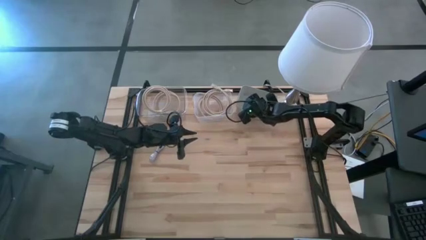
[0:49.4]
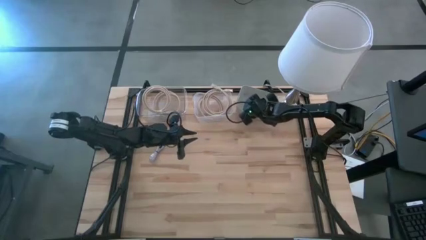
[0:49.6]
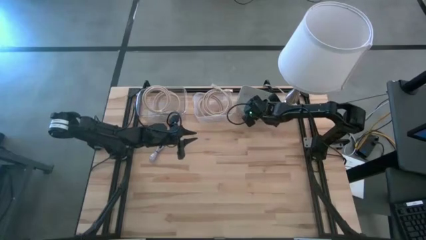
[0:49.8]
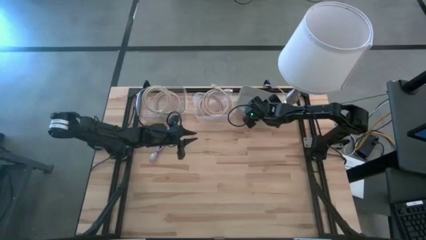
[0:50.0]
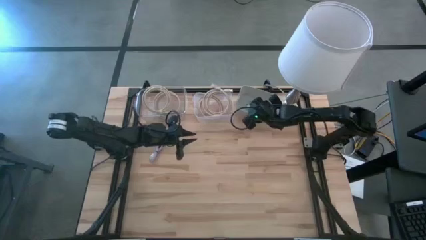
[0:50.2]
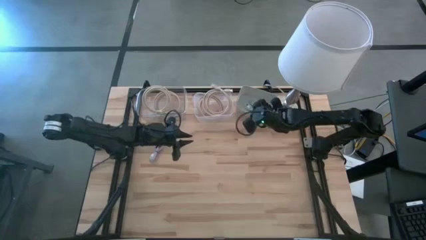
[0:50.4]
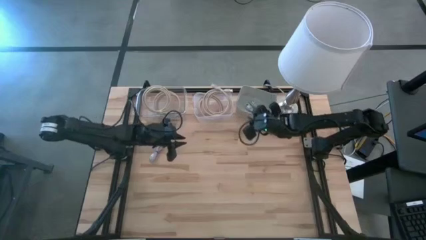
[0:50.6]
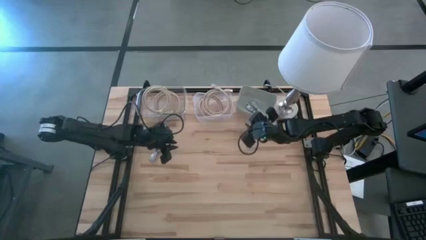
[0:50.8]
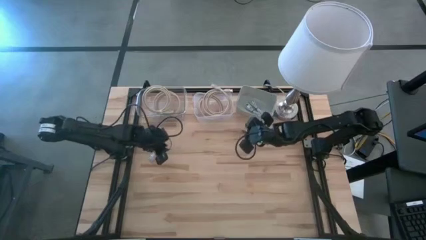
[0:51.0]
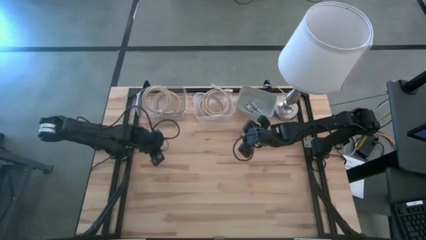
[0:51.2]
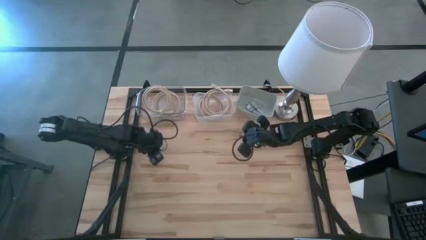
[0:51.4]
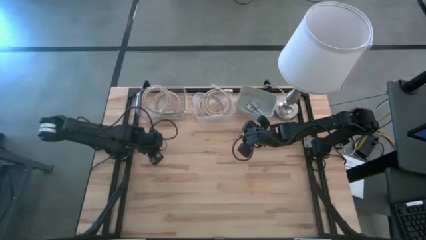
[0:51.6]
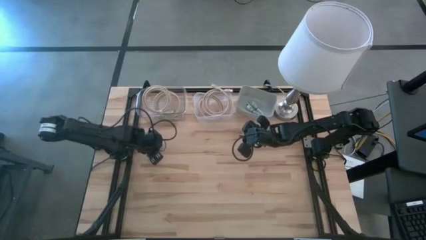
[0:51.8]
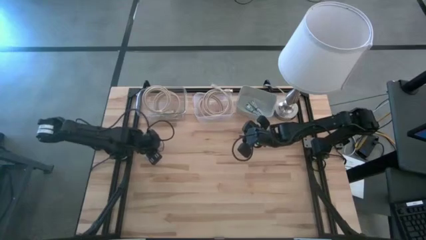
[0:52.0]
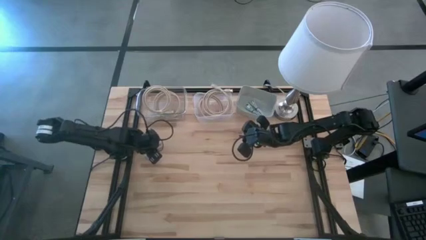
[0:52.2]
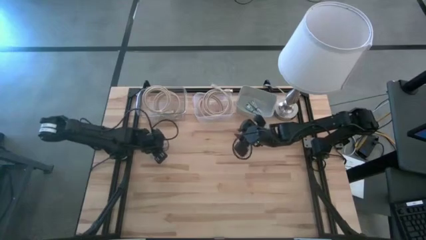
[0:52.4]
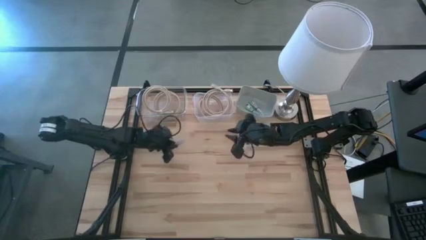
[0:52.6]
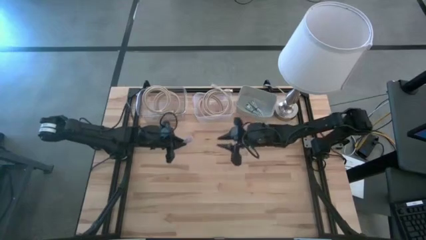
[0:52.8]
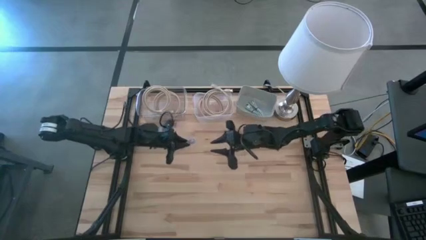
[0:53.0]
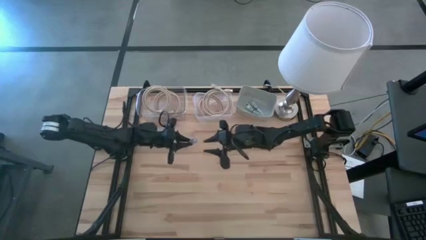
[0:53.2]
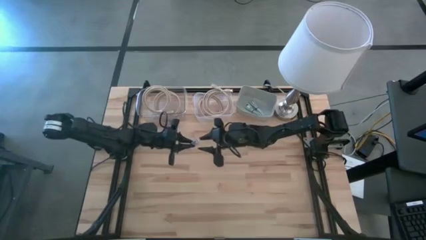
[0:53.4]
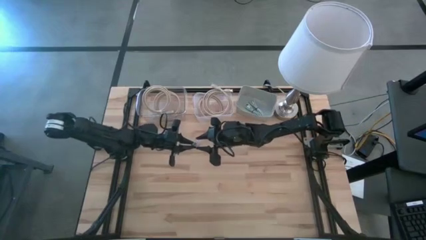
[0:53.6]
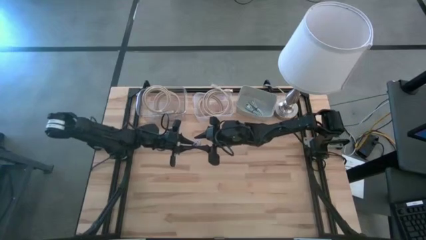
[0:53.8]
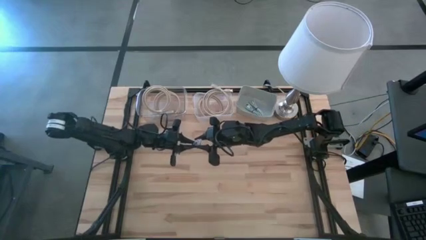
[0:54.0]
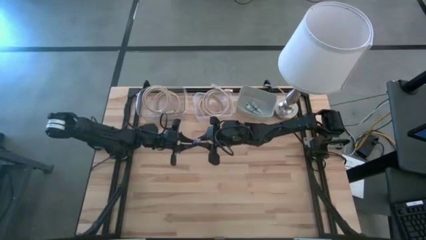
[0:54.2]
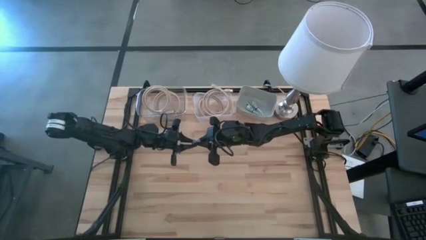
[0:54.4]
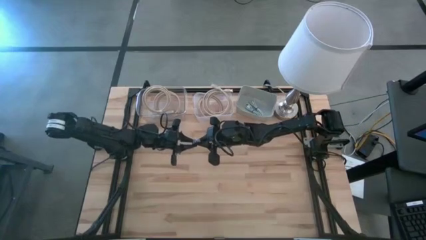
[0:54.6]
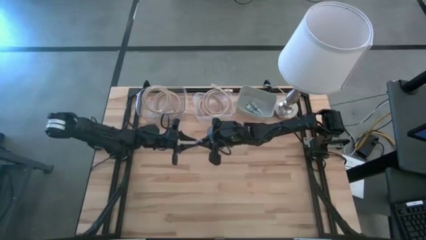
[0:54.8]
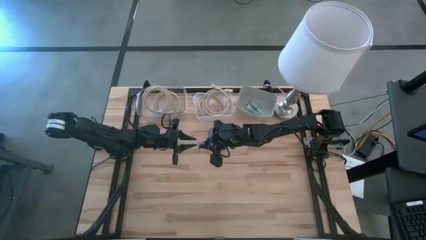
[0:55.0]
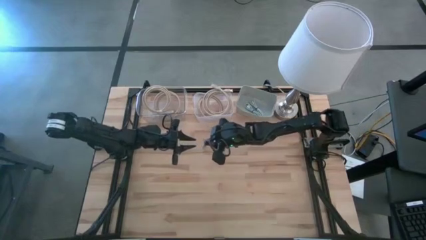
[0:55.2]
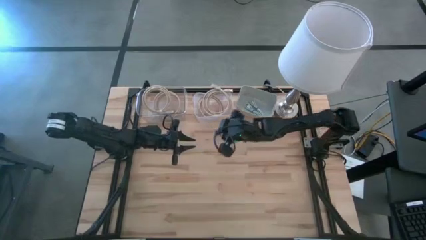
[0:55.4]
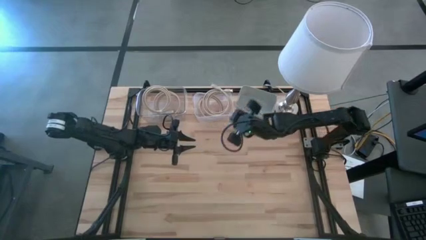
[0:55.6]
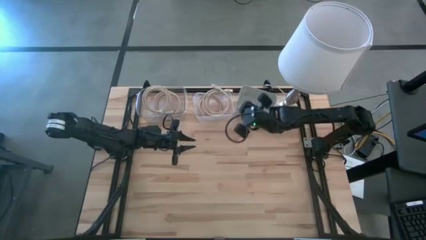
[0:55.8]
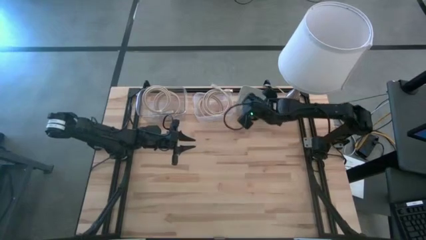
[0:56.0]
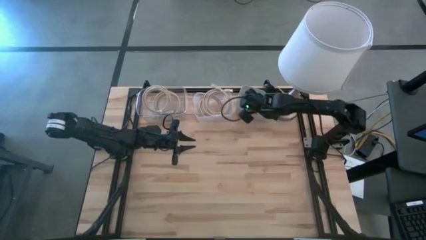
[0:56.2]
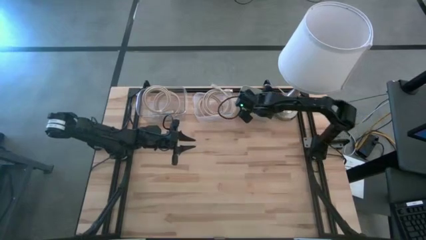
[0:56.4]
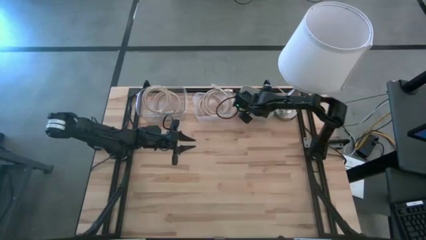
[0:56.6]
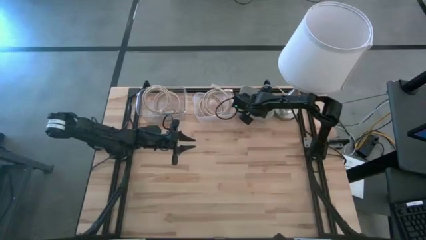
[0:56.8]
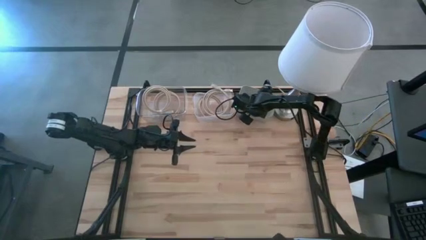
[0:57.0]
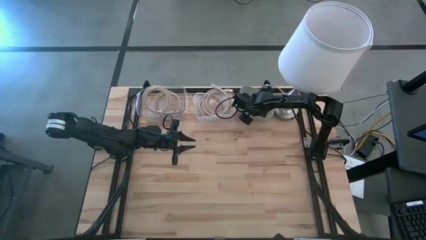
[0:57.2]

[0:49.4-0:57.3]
Task: Pick & Place USB Port
Put the purple USB cable into the gray bin

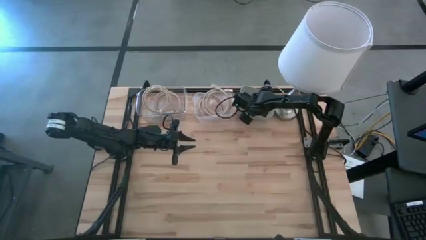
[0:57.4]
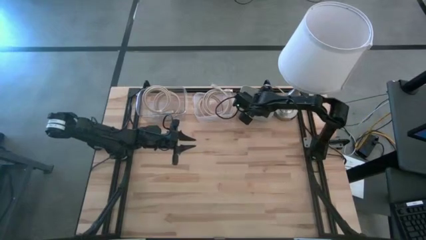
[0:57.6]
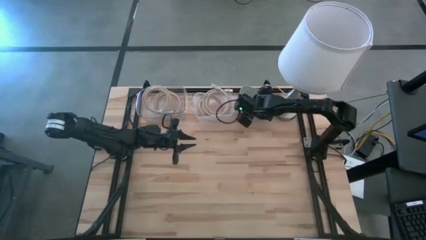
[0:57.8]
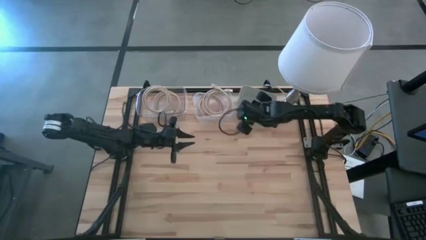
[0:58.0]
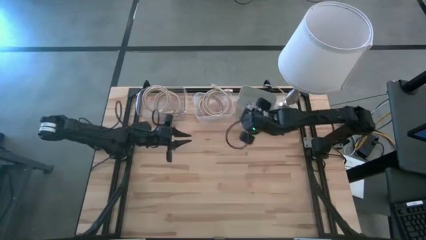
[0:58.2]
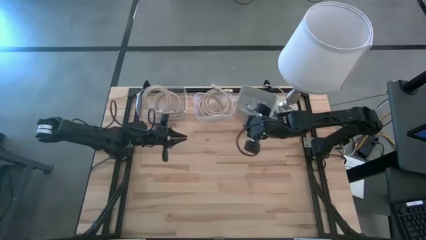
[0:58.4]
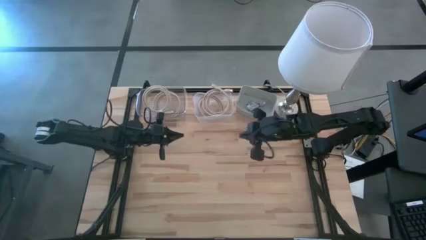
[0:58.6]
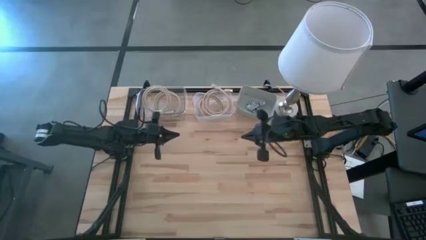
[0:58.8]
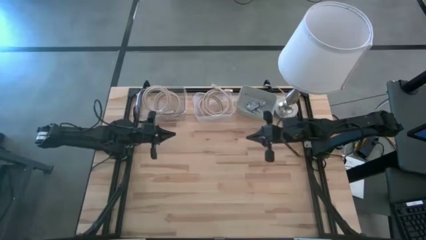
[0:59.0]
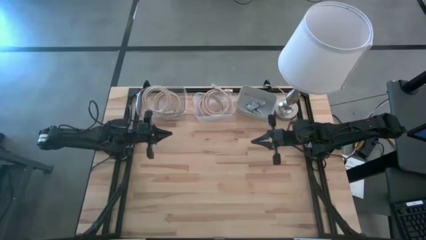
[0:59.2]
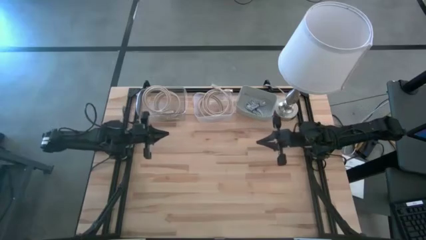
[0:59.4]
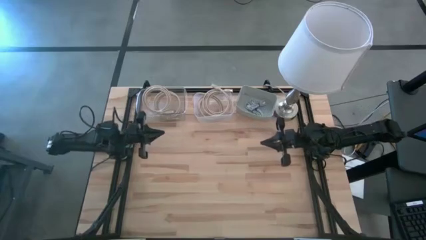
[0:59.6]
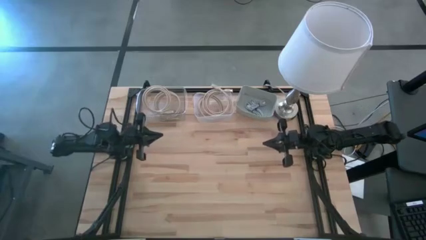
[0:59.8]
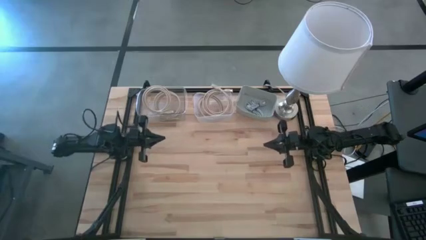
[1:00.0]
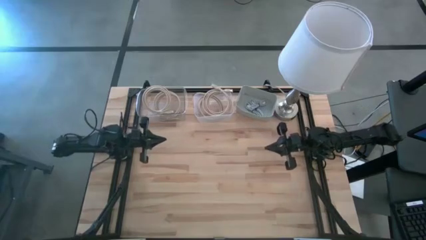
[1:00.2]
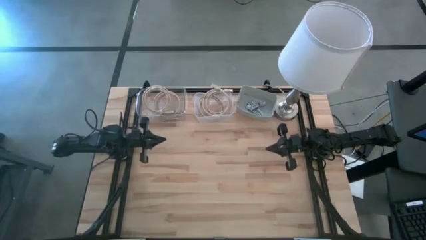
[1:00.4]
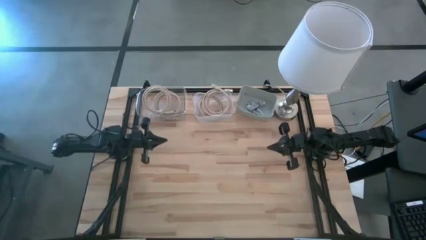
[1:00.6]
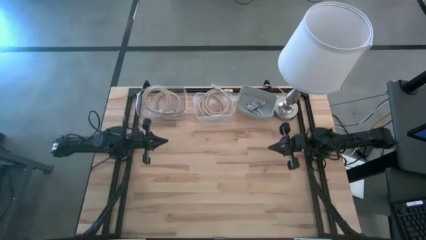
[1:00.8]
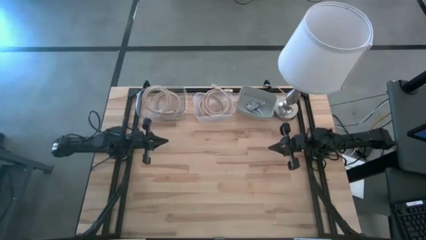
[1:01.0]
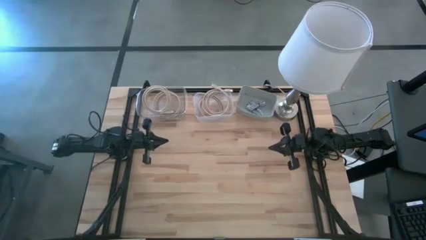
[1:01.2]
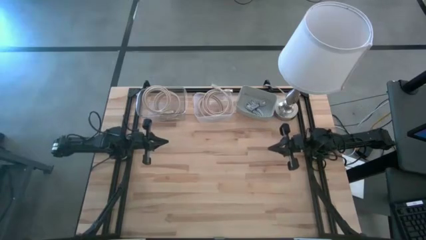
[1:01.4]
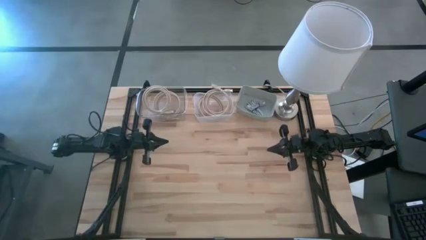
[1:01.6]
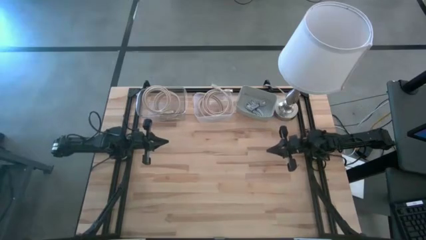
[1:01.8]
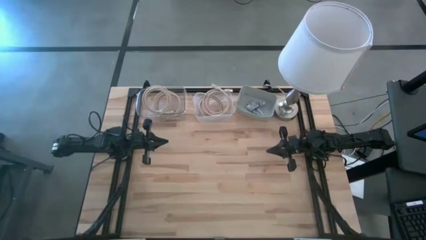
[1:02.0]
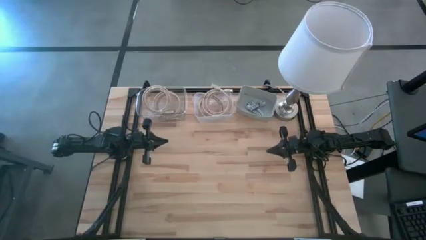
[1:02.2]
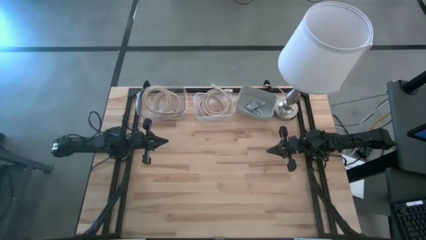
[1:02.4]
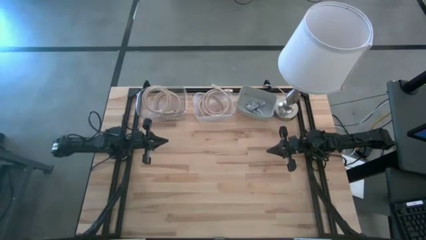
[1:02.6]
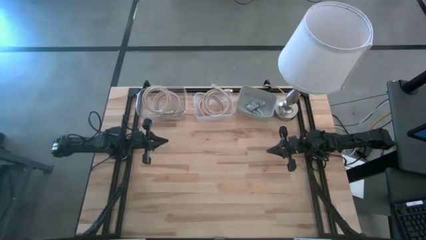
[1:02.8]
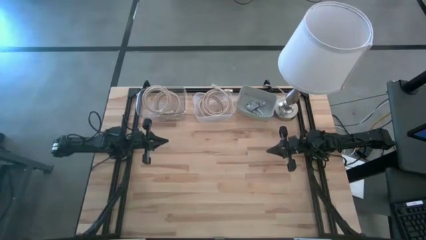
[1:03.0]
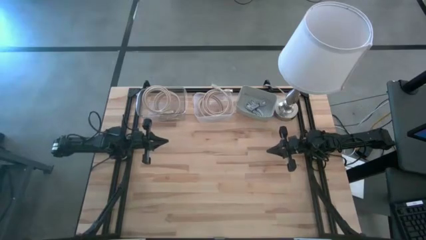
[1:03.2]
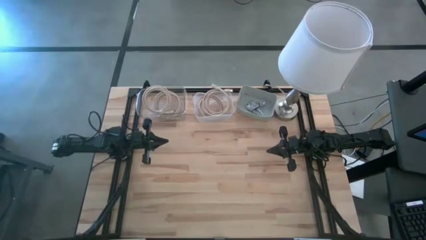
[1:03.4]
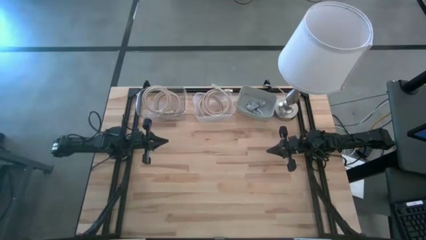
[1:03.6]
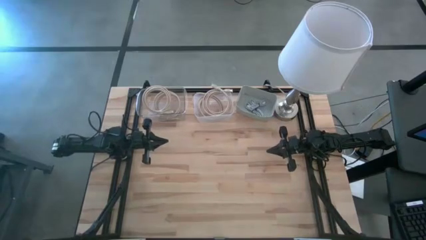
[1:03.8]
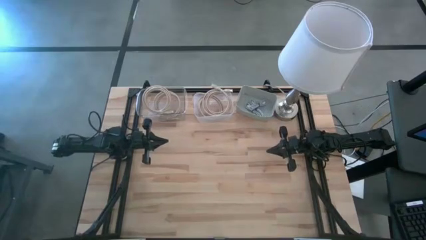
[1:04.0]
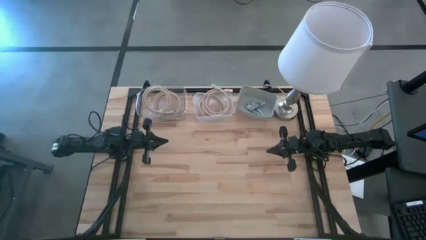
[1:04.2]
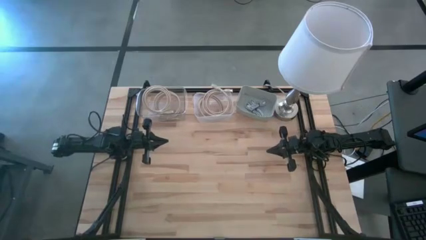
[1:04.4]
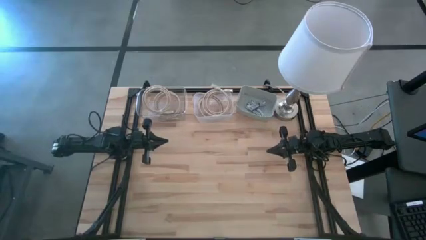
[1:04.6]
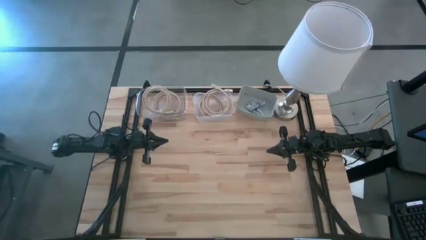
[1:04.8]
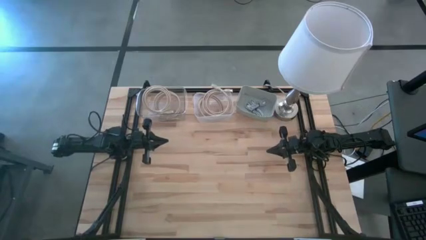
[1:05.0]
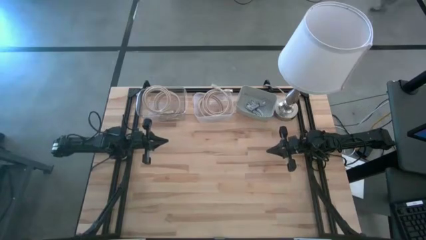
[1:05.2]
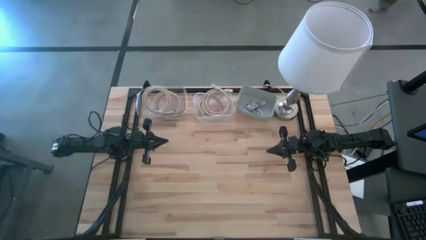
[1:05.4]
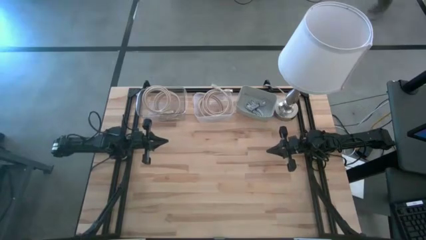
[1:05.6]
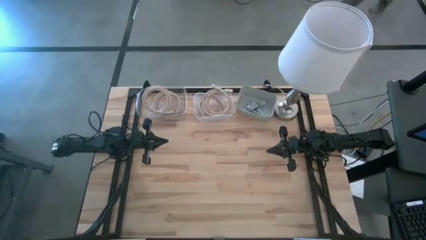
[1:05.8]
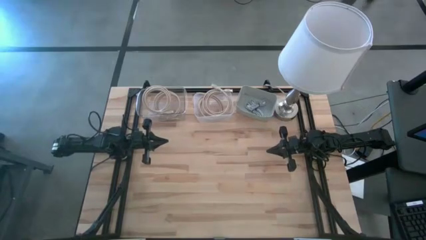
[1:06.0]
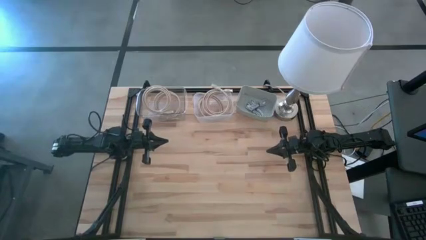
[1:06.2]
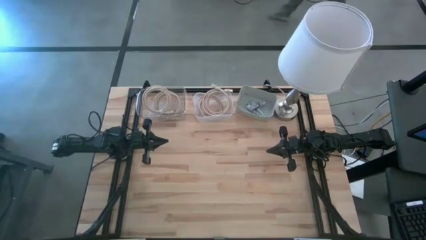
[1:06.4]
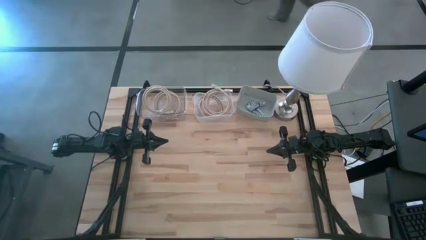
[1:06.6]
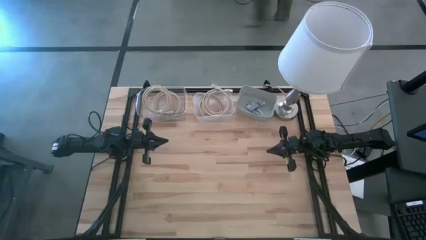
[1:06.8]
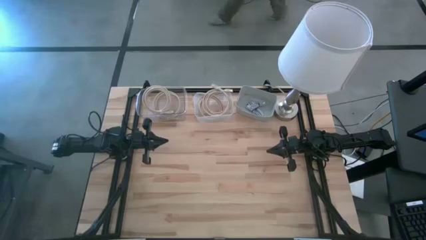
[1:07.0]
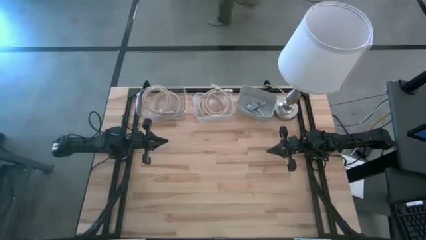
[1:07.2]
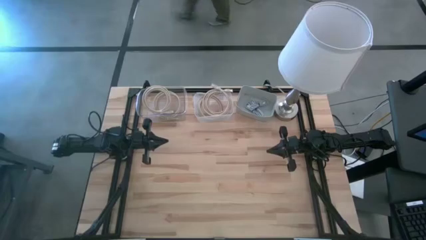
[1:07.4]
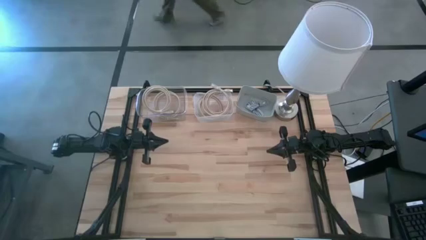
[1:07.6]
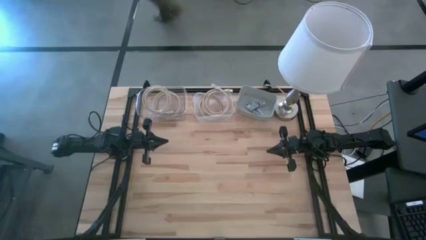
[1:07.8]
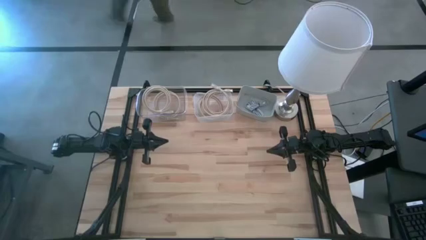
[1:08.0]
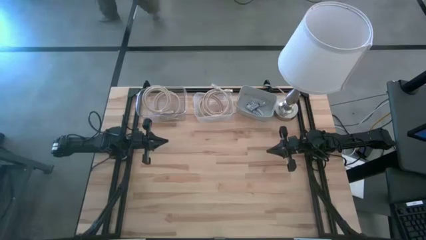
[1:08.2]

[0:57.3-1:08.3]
Return to Home Position
